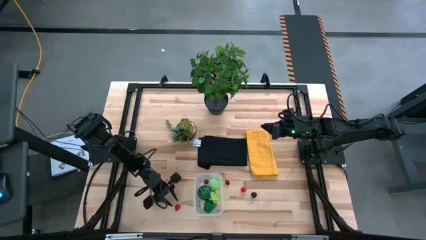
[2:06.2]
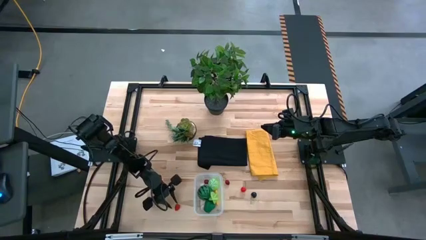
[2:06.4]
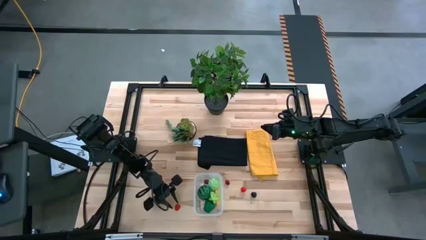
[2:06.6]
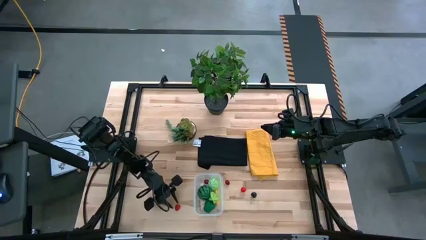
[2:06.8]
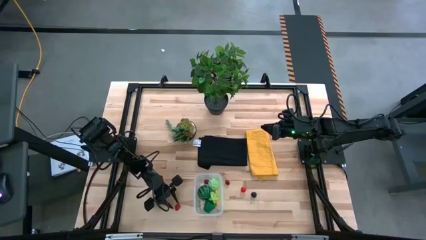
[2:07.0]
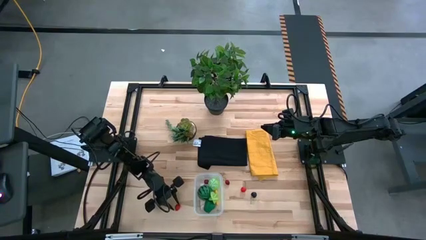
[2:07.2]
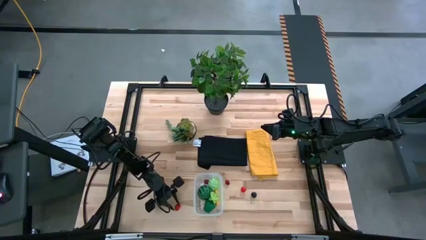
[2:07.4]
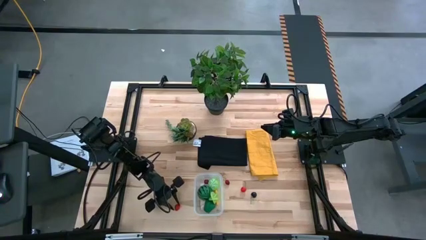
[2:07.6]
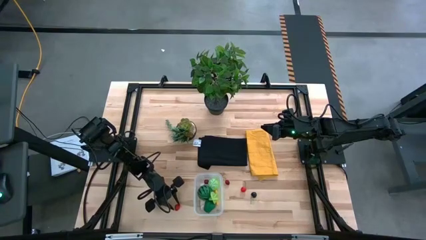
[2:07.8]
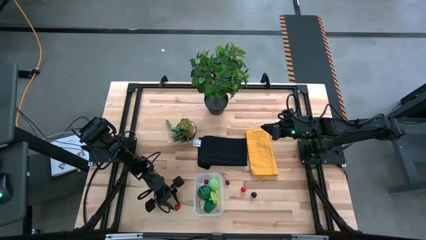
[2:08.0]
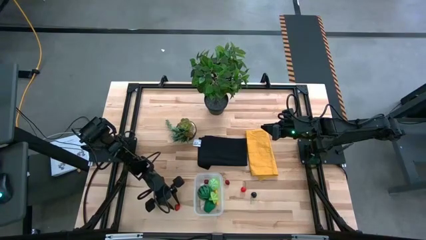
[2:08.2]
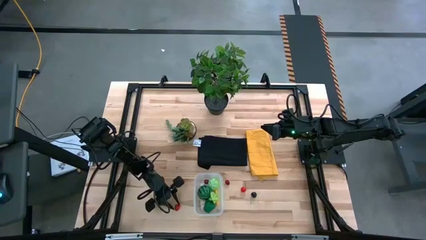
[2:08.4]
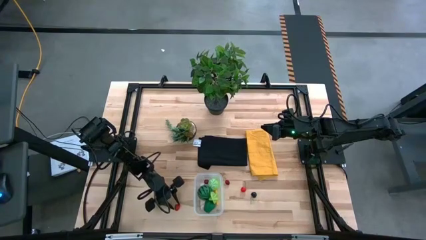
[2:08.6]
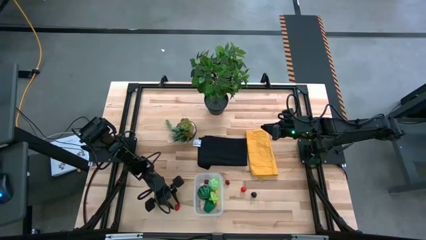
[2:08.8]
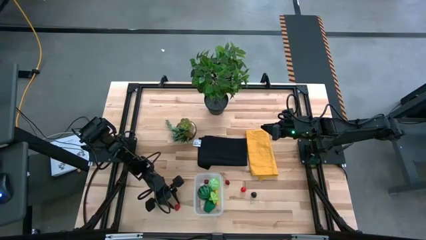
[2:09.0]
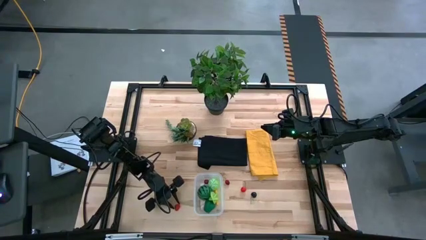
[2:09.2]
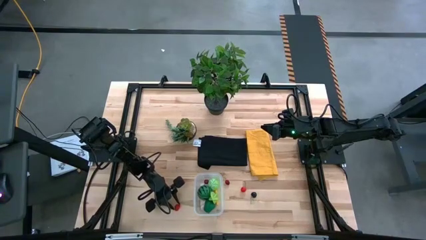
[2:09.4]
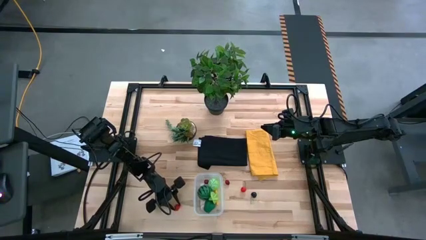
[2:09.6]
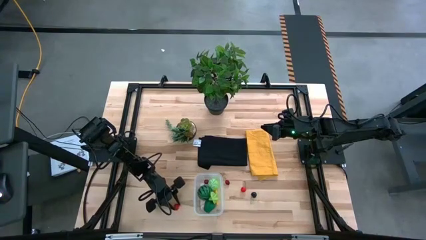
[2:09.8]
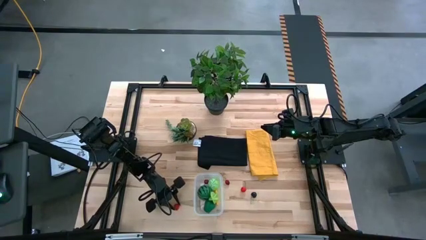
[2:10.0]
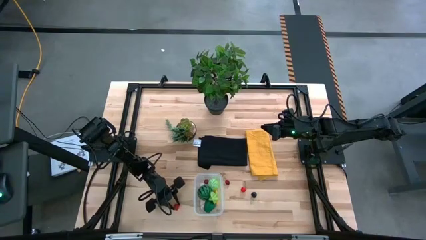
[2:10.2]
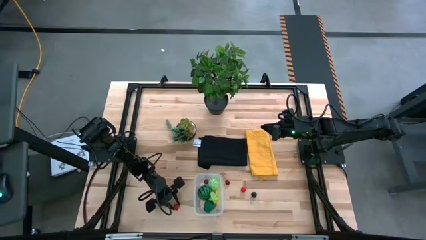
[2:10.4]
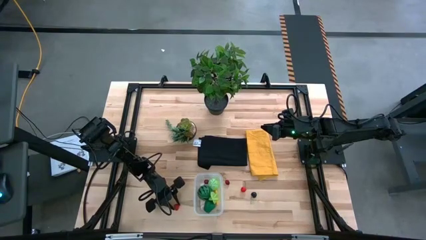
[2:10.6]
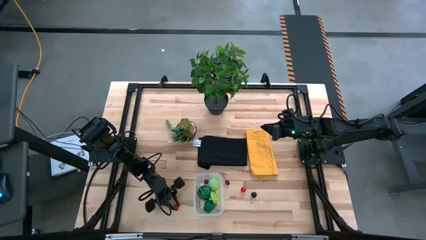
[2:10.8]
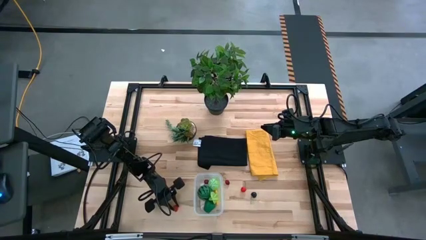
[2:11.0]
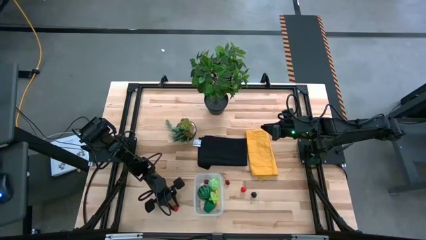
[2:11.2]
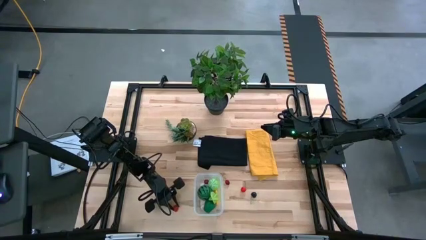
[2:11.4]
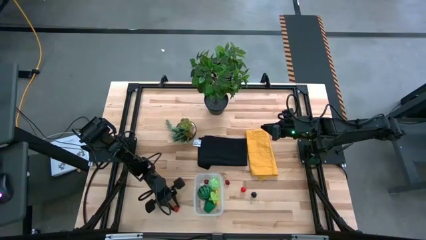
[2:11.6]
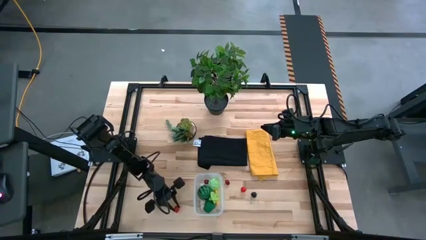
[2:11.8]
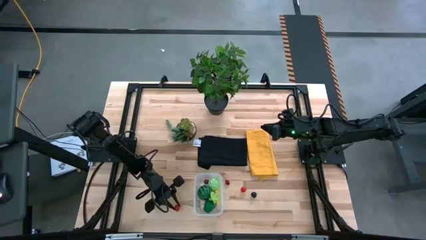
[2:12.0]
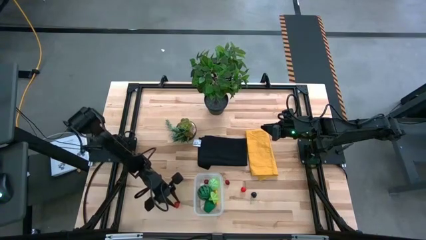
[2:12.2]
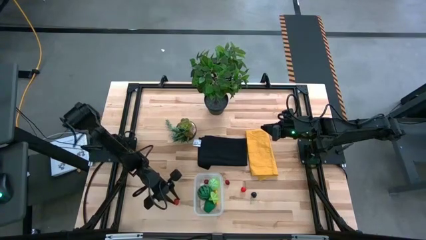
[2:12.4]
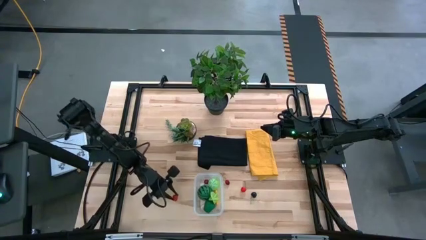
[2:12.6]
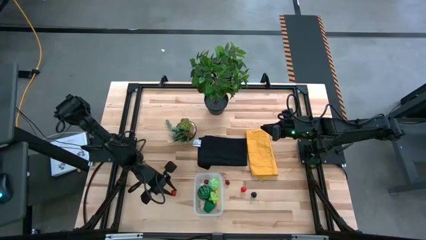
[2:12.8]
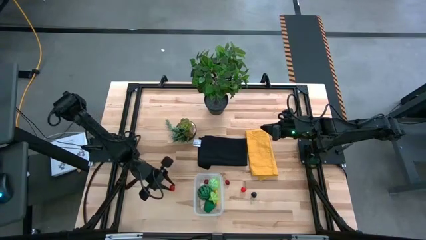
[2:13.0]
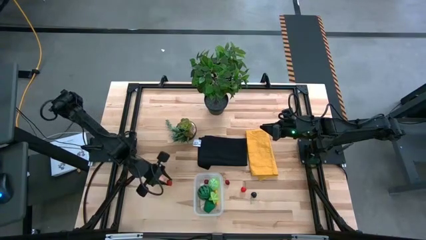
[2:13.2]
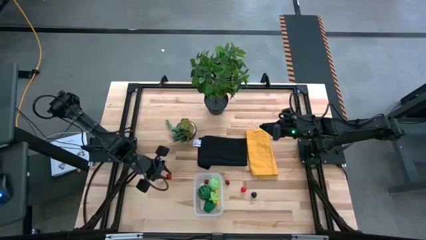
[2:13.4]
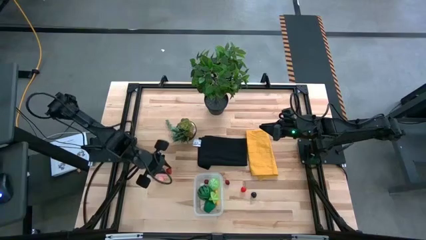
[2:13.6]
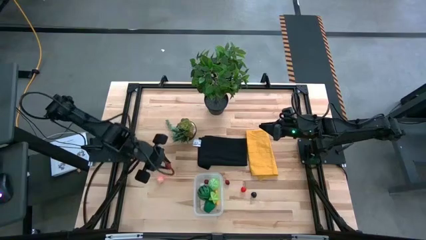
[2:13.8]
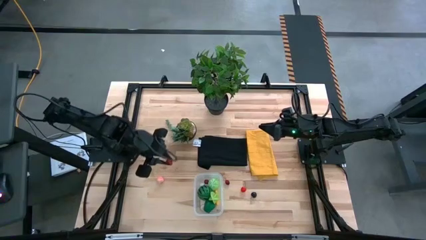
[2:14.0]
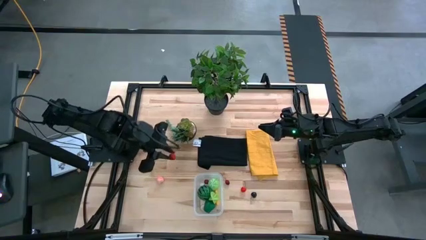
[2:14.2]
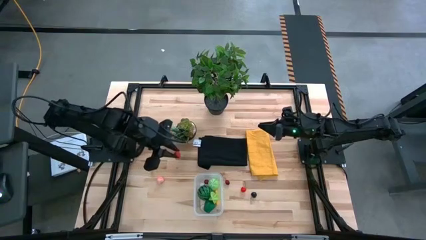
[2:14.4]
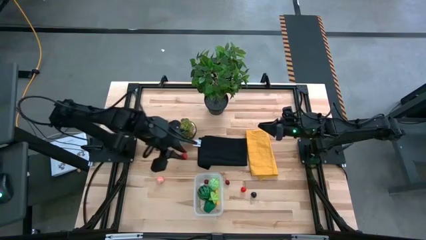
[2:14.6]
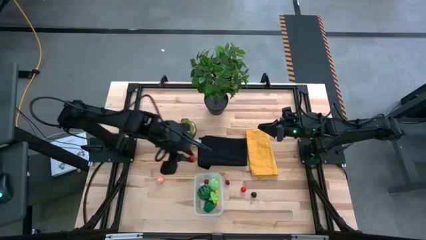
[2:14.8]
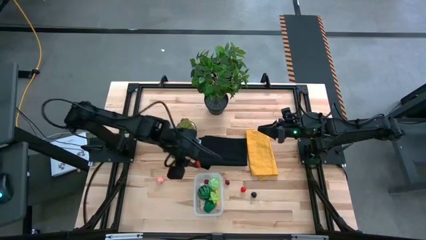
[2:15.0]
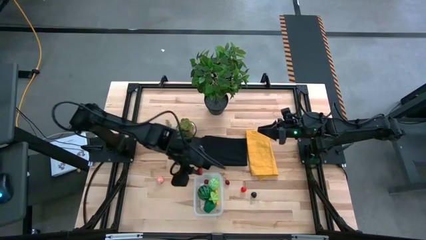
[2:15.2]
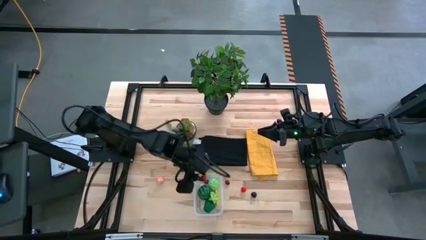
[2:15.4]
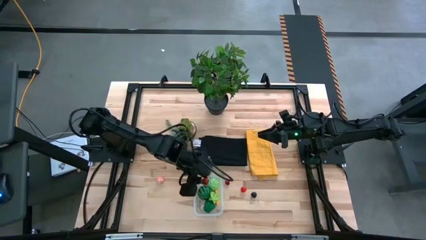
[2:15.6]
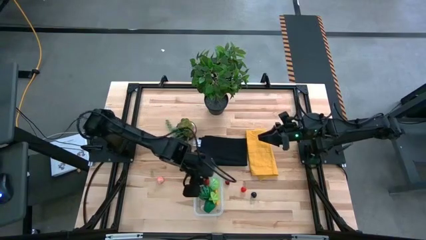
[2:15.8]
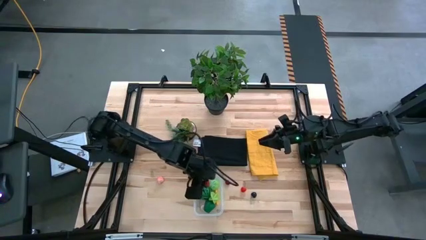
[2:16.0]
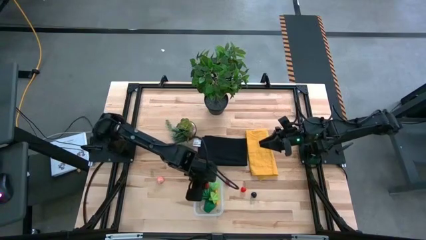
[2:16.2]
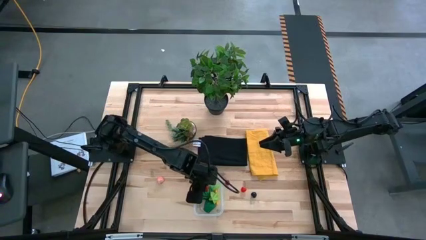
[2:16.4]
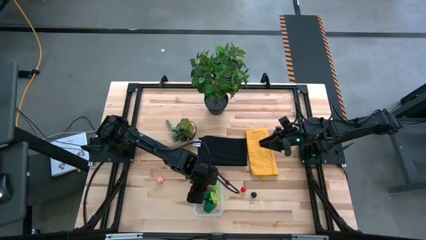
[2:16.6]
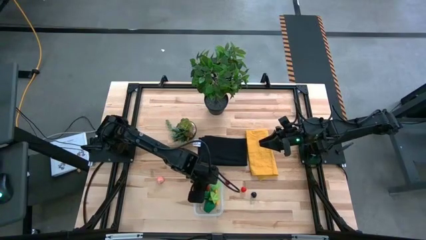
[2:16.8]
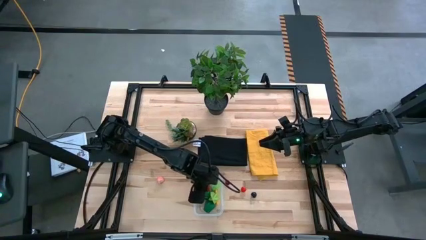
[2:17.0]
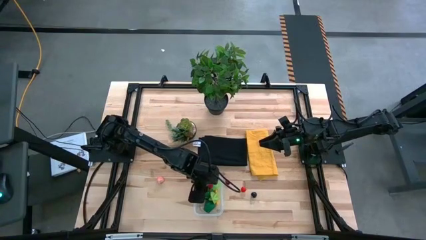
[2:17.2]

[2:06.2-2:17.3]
Task: Pick and placing Produce into tupperware
Put the raspberry into the bin
